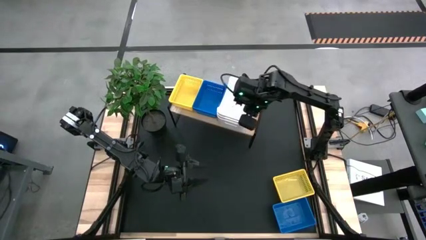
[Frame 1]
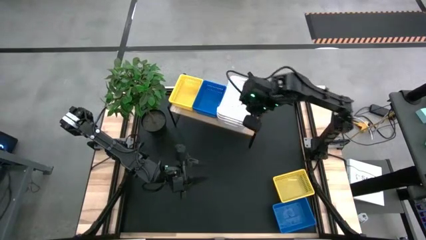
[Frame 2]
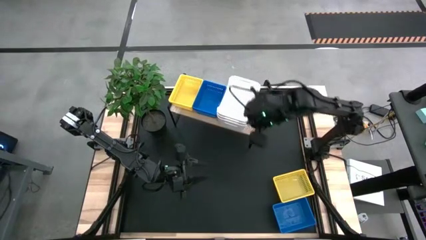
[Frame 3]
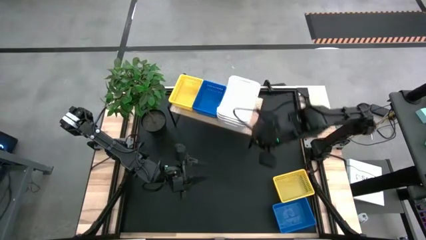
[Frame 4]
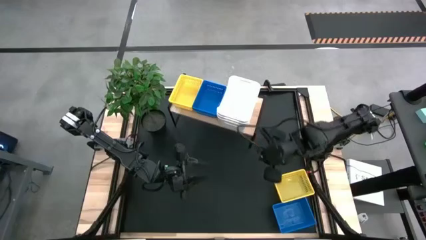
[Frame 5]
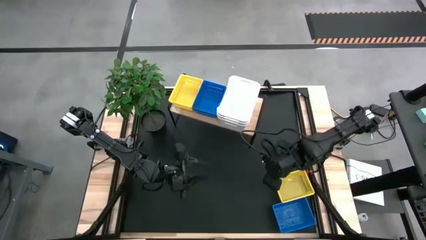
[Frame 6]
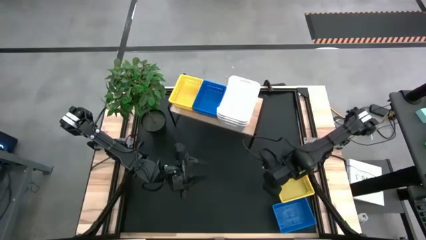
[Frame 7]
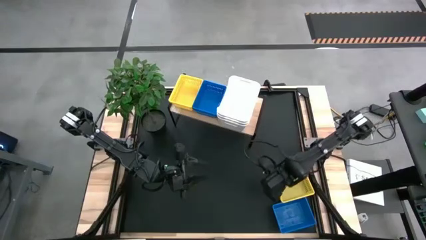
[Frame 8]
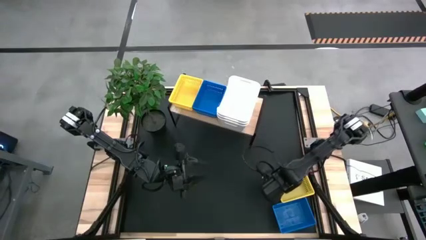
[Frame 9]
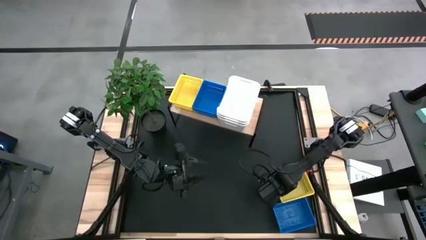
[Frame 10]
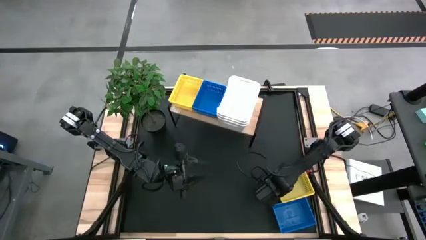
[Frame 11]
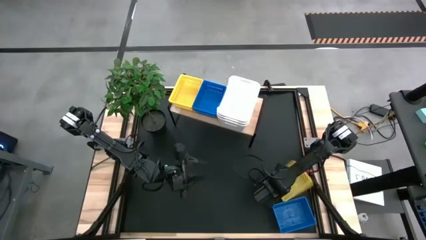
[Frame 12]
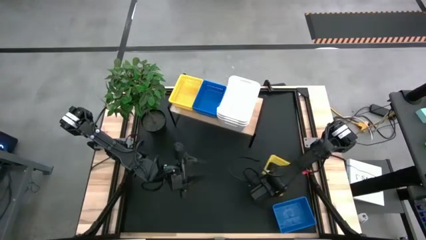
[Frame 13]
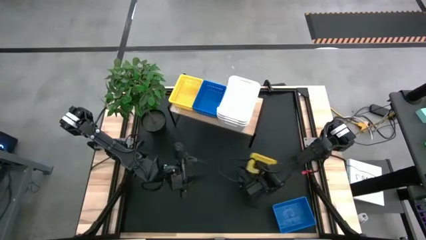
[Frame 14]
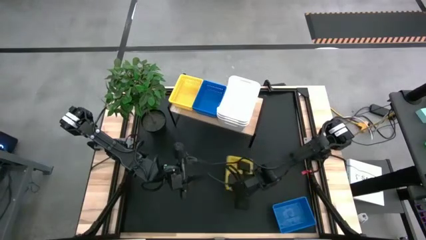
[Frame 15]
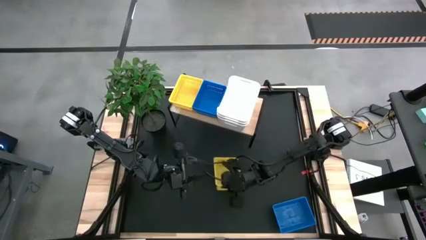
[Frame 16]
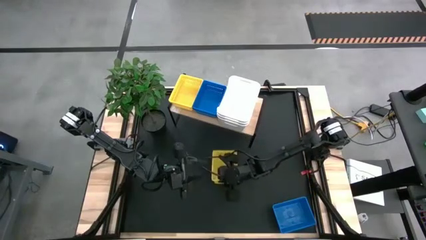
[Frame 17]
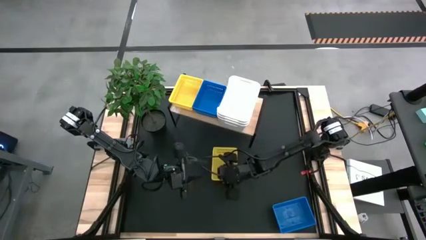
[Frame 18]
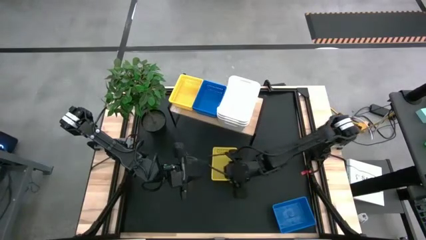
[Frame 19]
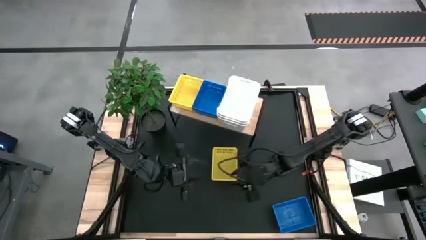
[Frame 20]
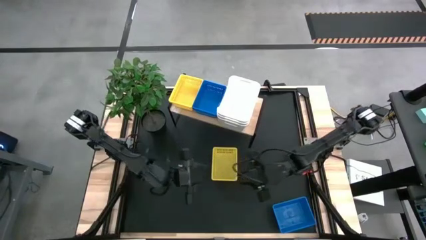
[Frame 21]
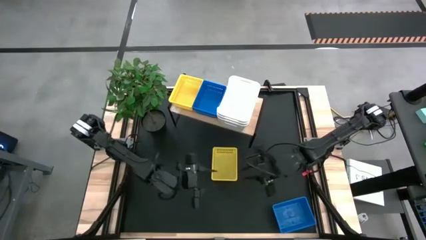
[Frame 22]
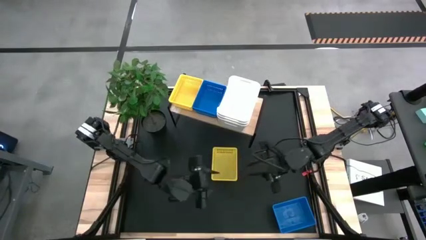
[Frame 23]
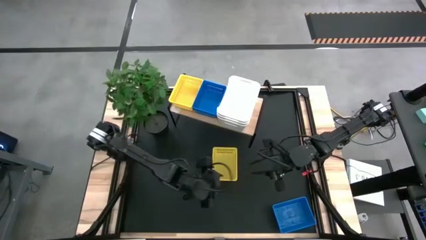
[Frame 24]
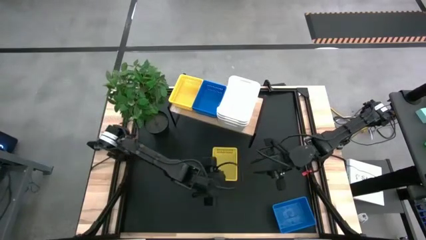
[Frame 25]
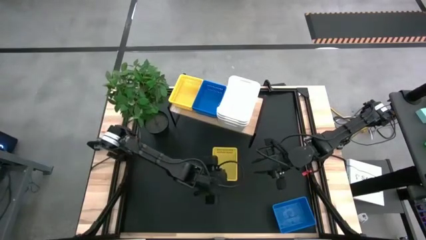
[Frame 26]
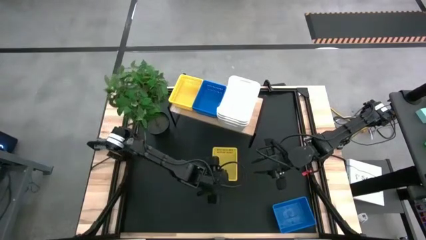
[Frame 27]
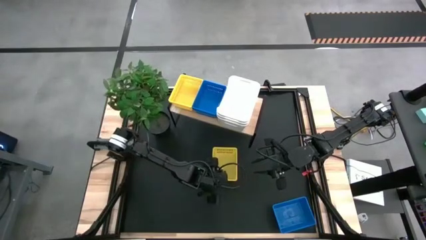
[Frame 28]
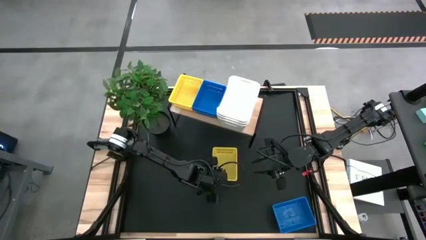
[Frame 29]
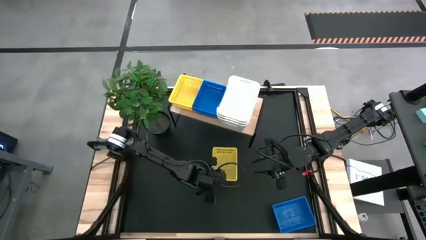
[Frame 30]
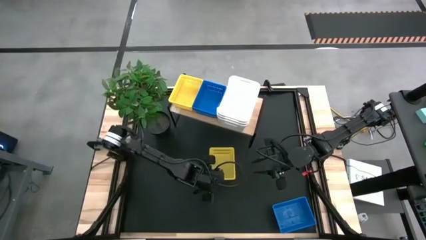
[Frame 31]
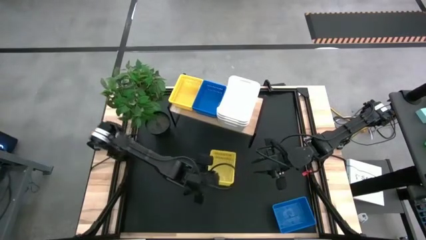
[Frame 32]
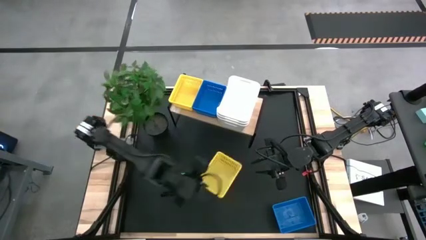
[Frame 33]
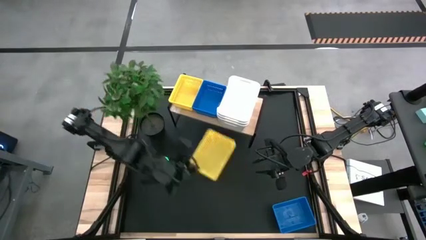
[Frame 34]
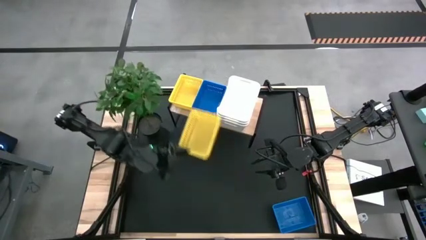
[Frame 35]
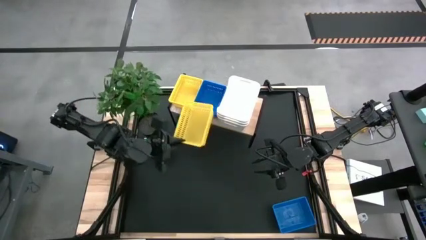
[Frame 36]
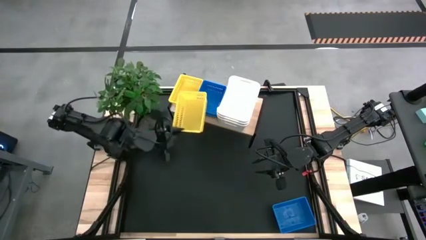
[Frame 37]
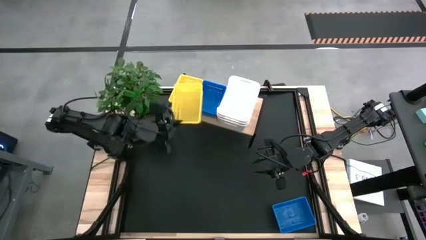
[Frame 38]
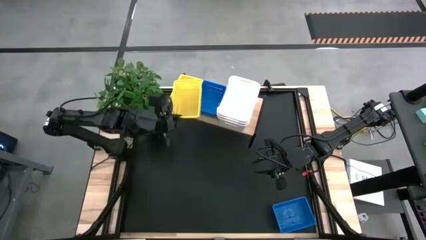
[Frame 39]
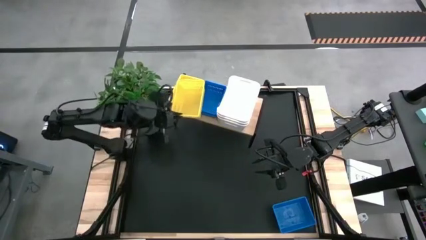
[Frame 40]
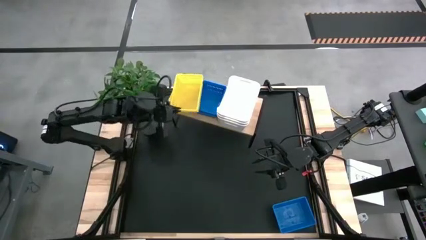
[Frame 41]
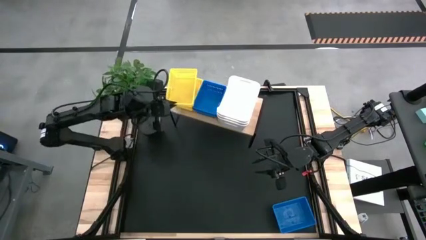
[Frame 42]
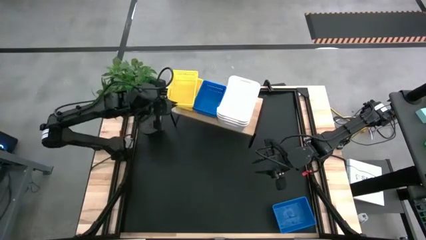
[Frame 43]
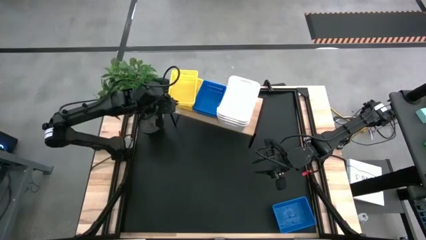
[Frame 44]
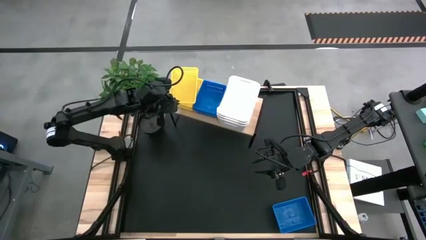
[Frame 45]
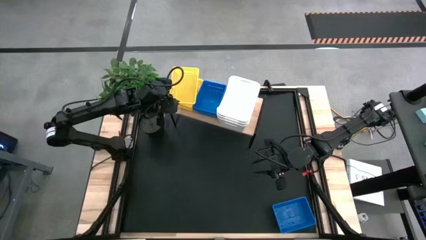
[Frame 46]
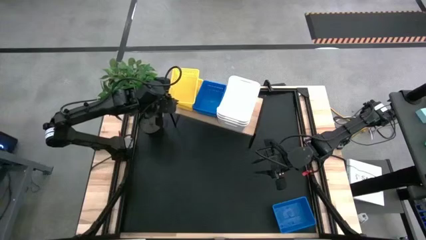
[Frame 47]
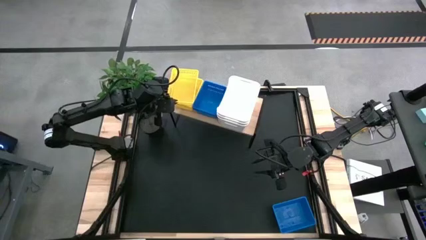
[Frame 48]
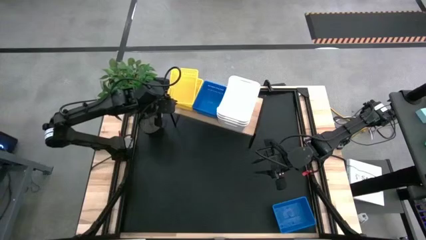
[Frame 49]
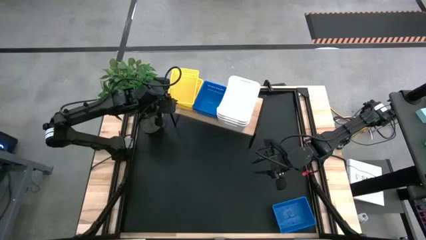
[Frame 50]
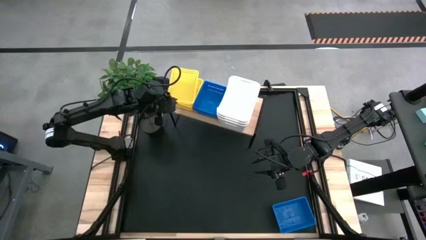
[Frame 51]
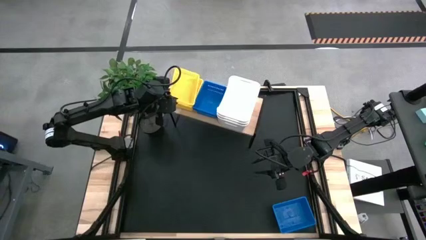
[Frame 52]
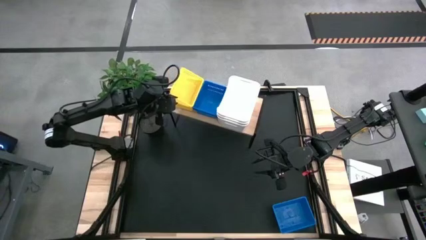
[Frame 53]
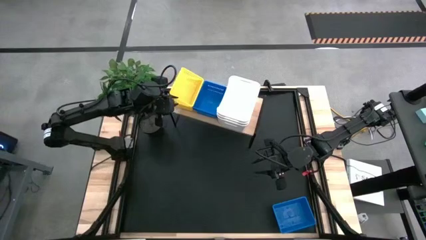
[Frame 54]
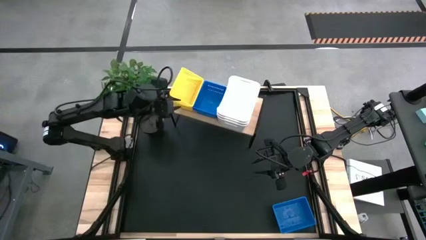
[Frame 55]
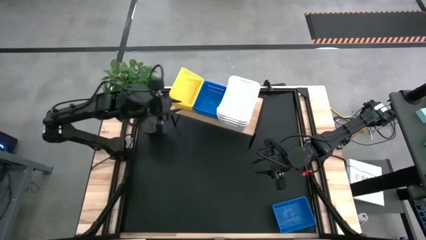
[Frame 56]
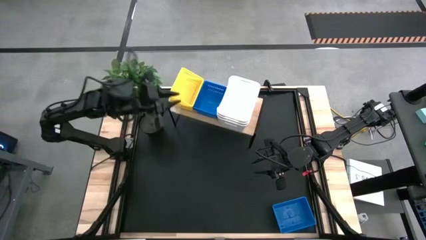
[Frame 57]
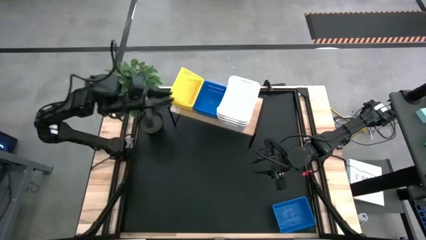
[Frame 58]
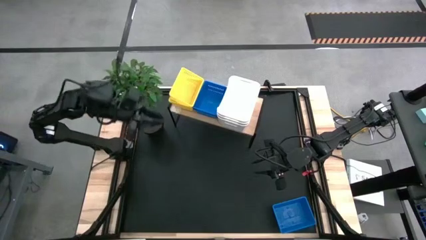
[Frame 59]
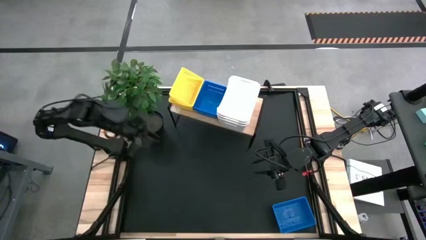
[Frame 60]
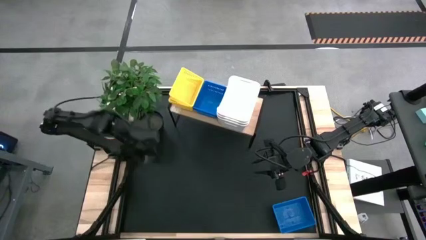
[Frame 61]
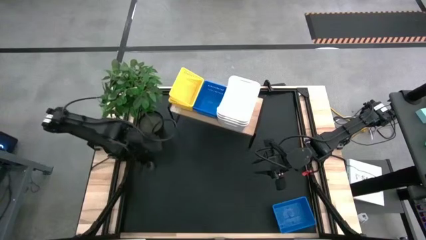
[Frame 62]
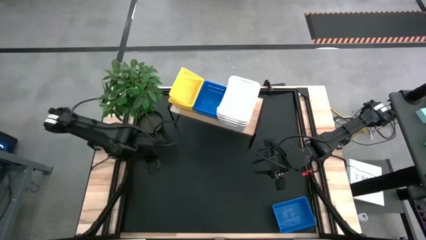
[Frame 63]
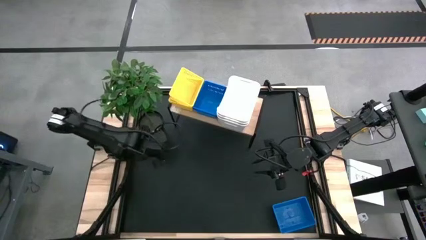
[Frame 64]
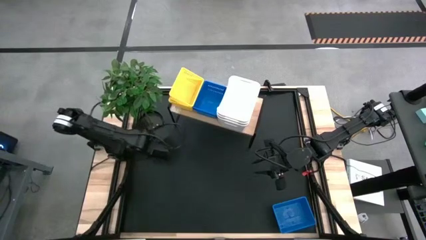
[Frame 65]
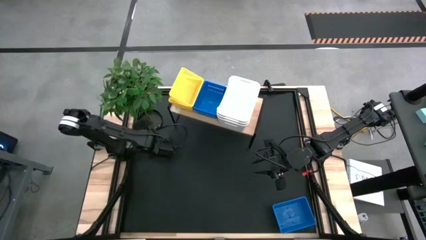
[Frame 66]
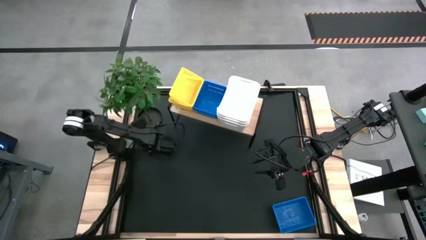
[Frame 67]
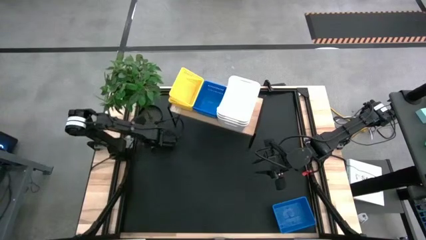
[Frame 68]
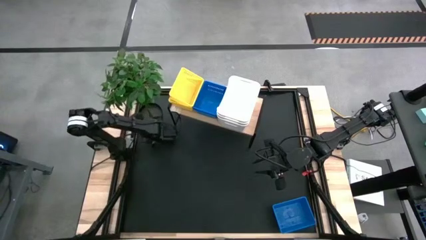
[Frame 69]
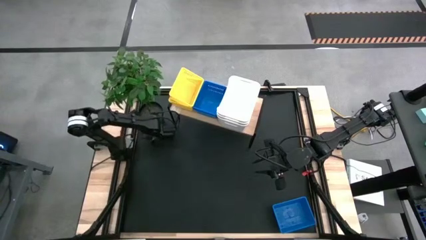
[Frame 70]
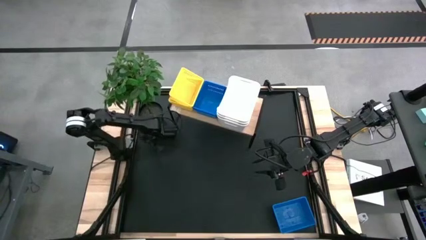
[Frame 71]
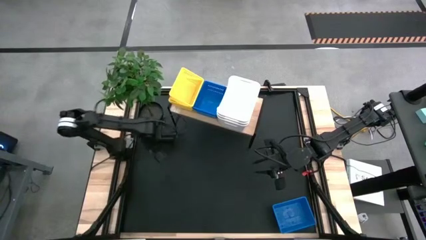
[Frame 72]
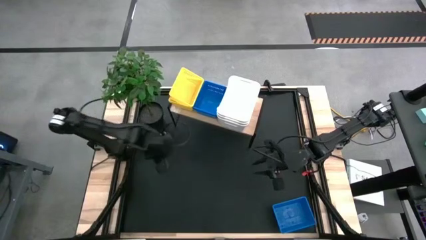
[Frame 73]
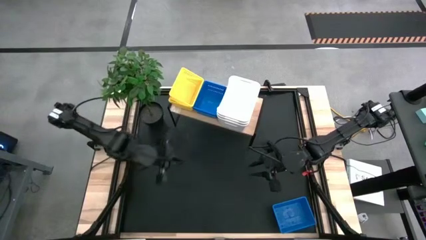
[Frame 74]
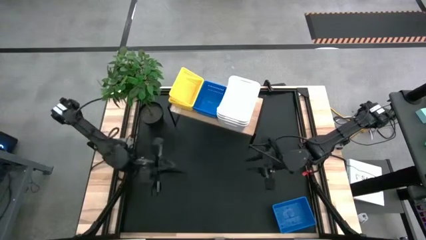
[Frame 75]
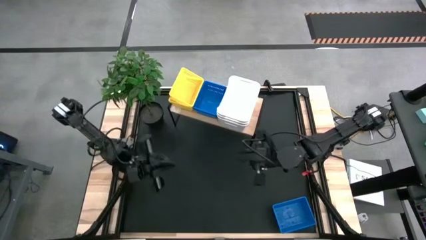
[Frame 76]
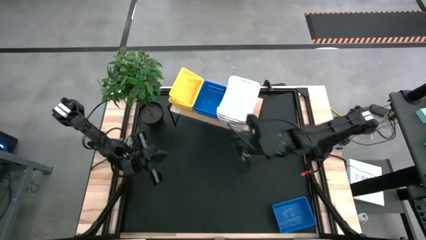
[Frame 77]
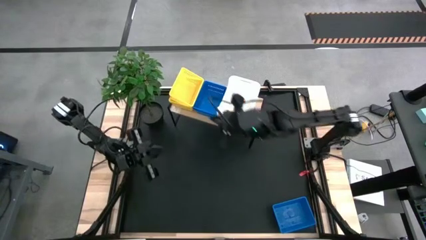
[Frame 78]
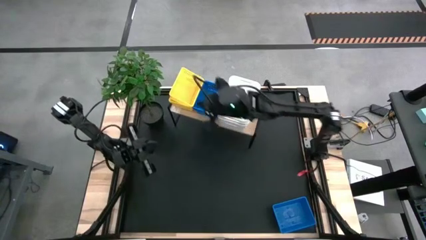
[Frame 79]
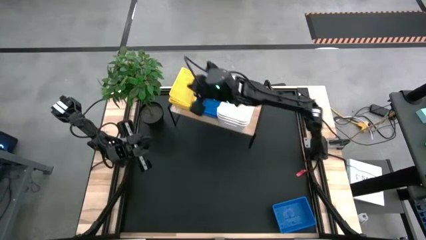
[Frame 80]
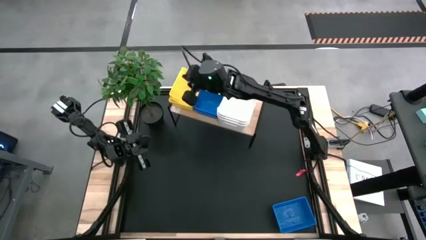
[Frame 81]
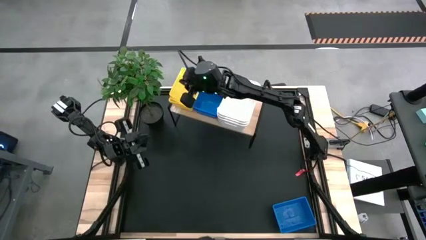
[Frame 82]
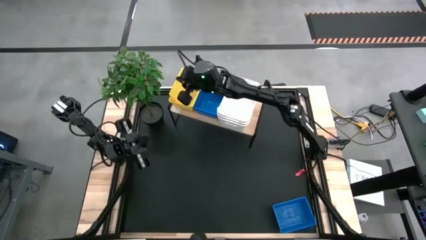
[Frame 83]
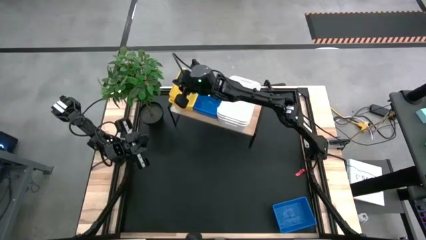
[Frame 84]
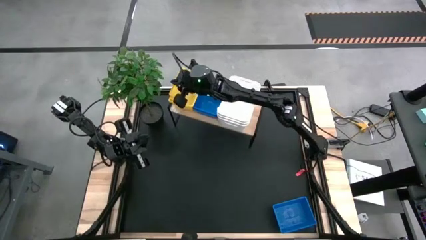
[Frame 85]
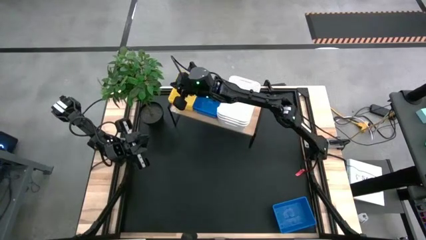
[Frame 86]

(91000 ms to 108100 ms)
Task: Stack baskets on shelf by color
Stack the yellow bin on top of the other yellow bins on the shelf
